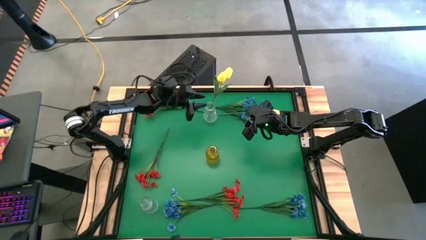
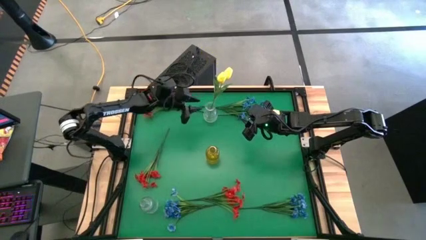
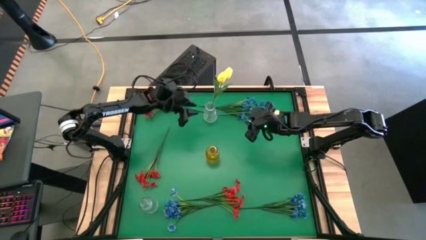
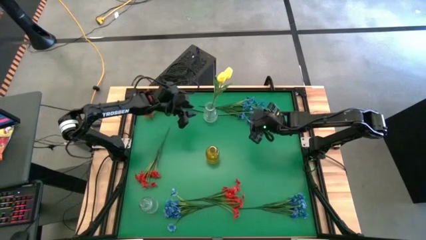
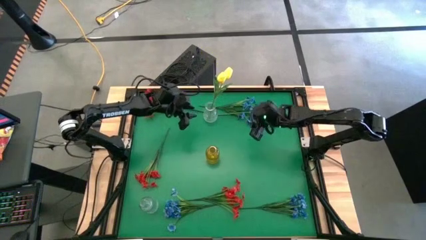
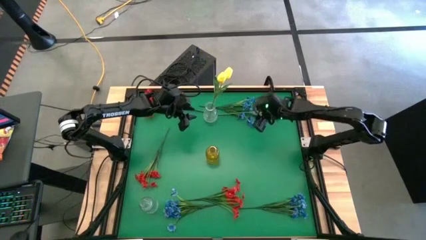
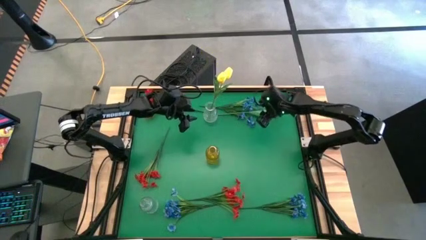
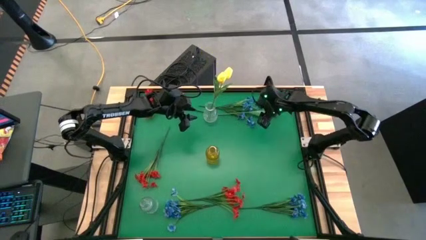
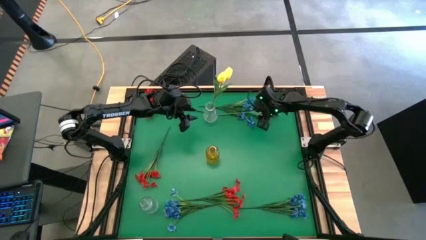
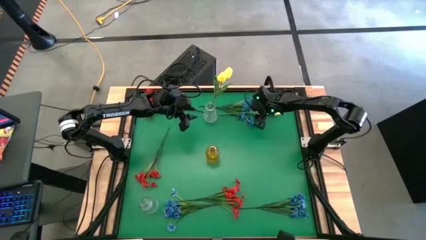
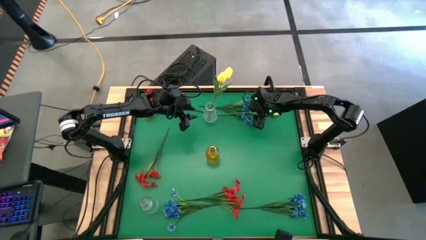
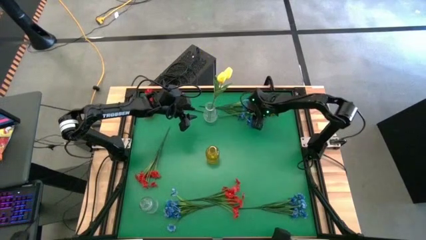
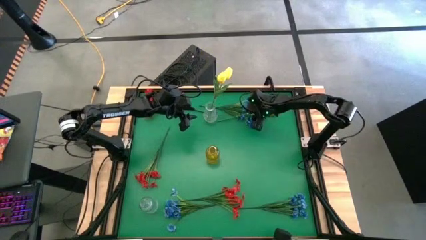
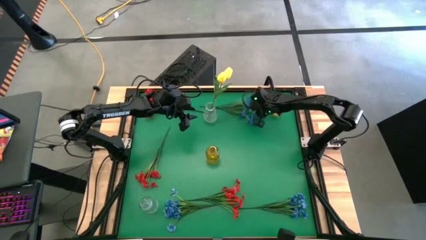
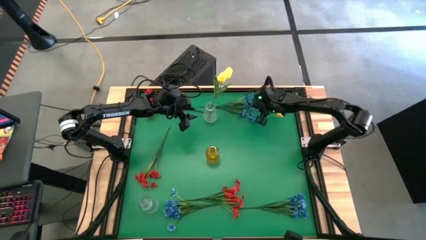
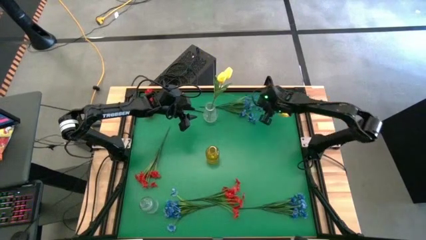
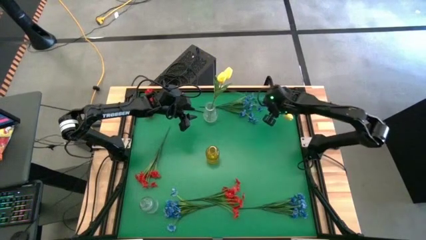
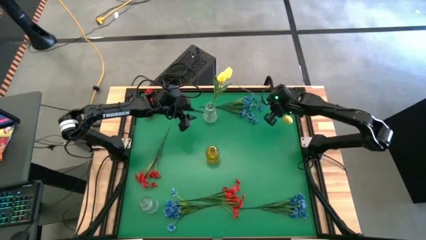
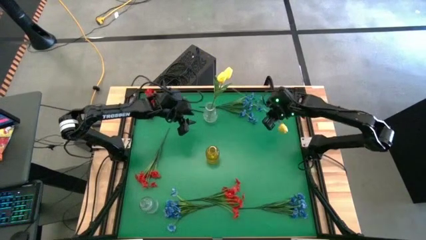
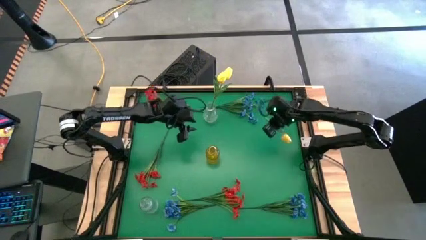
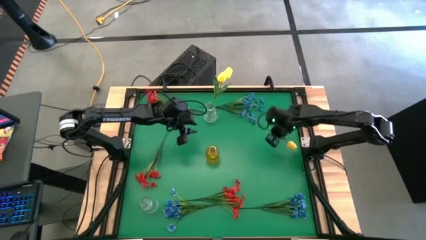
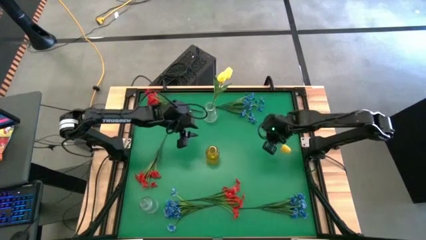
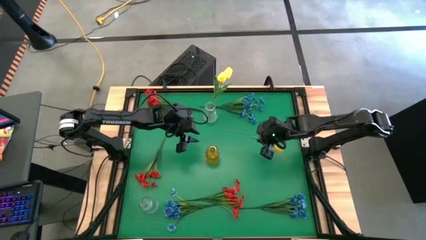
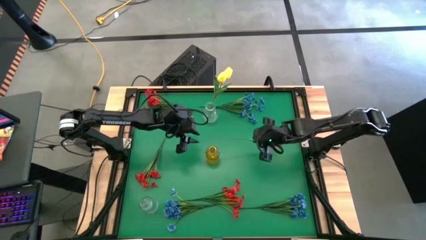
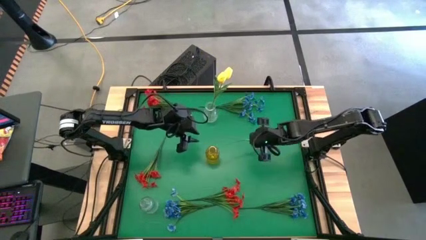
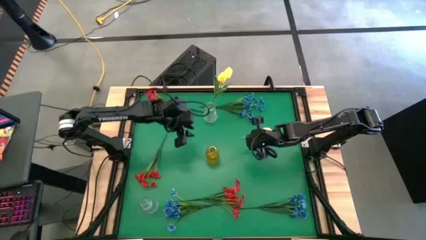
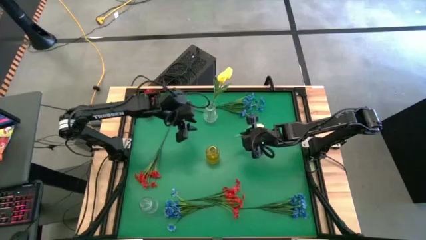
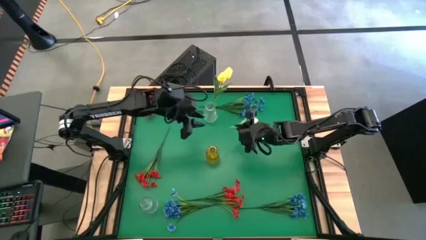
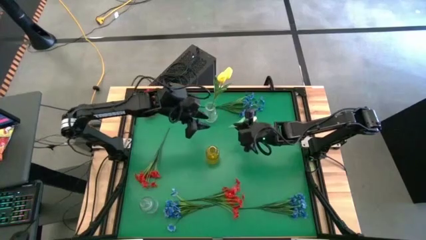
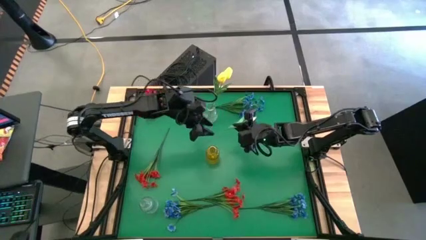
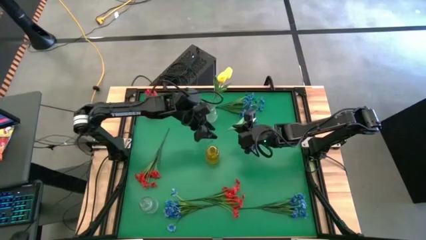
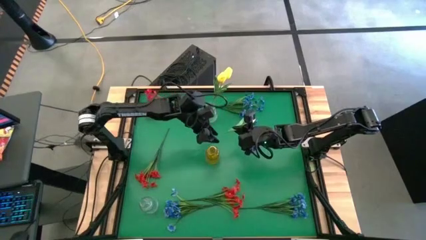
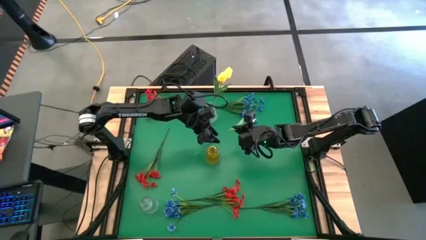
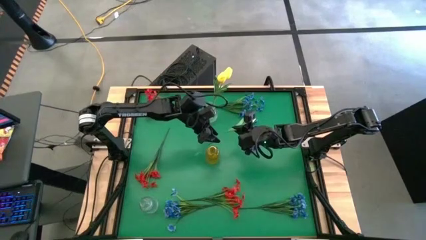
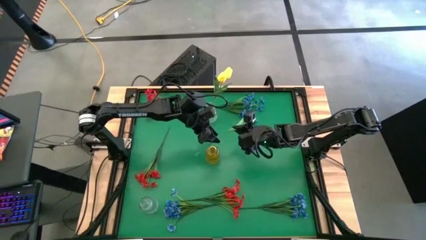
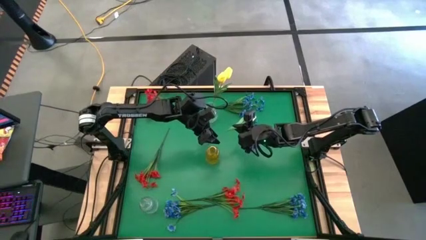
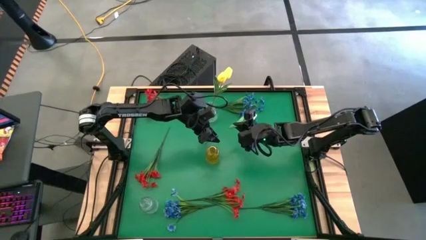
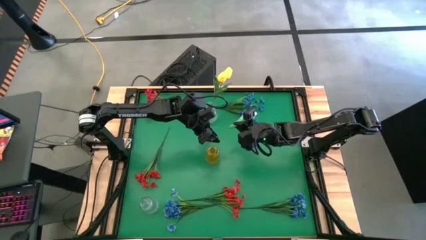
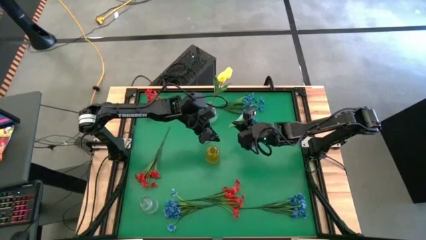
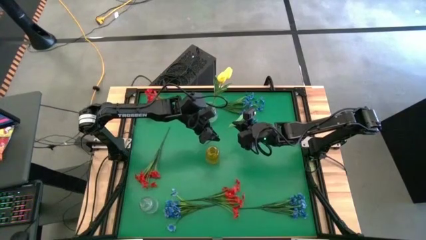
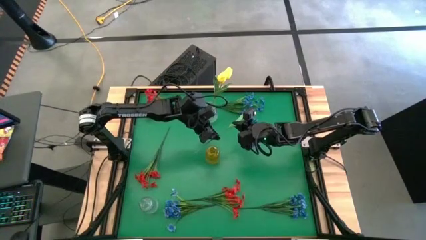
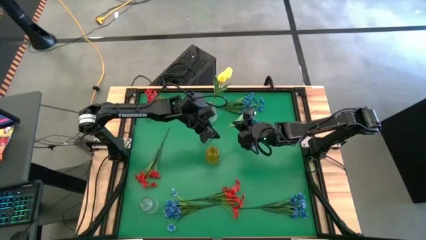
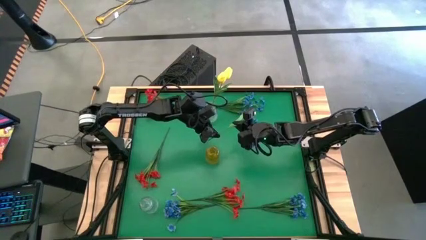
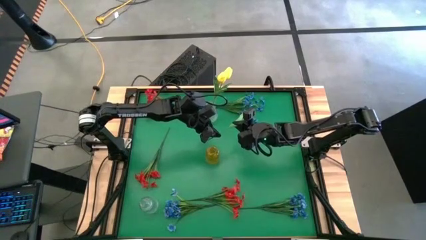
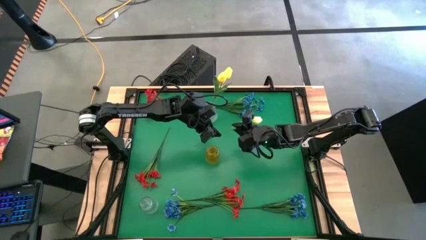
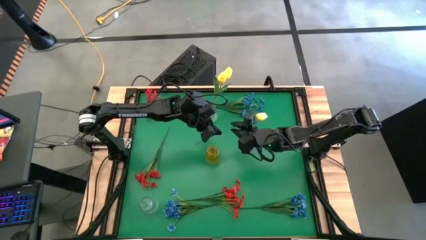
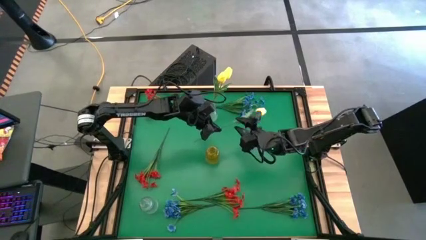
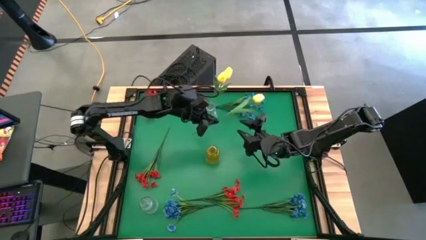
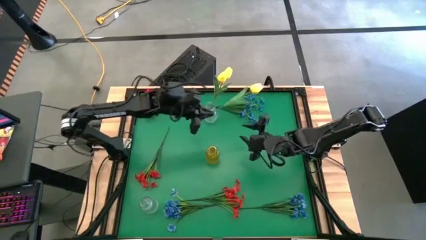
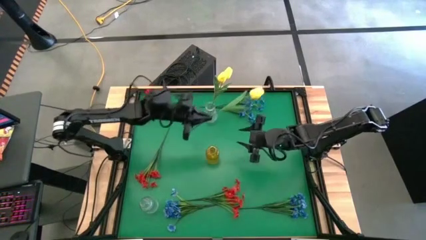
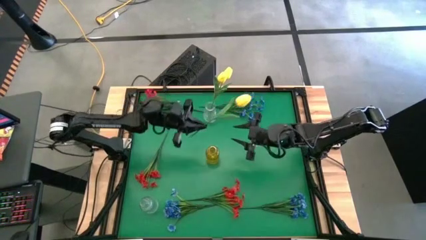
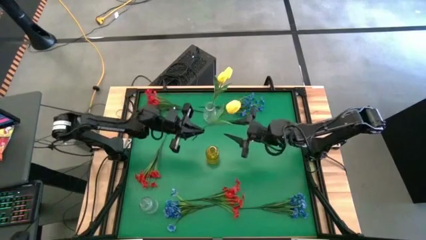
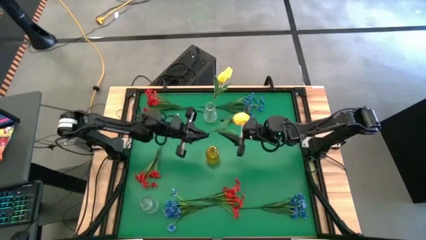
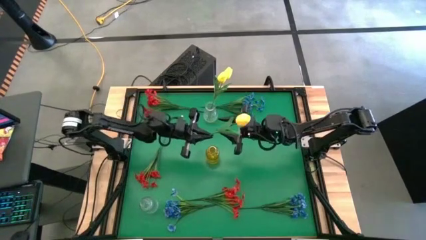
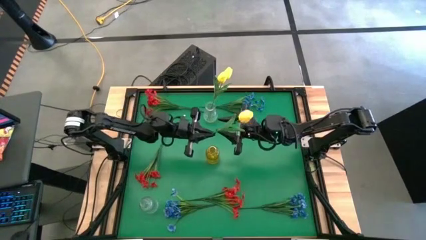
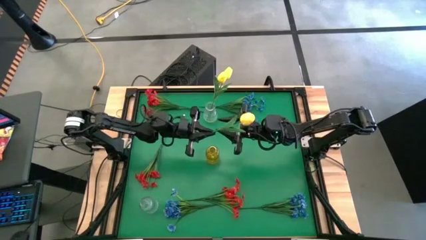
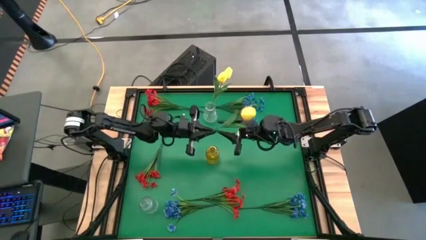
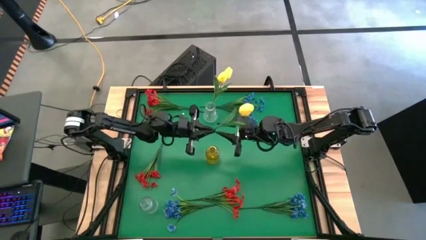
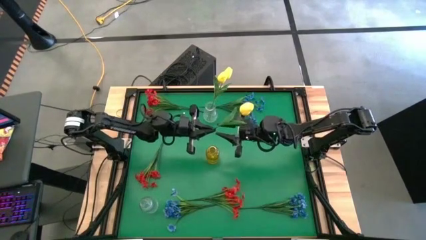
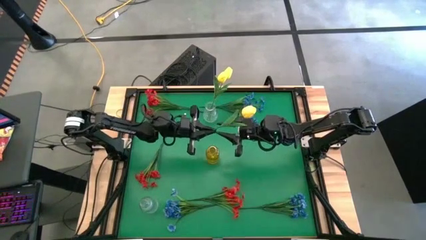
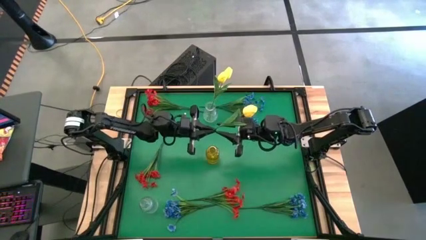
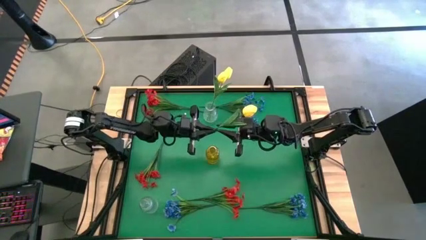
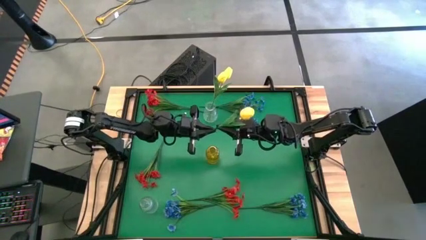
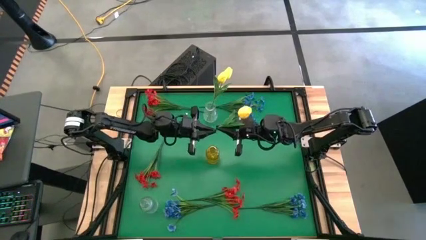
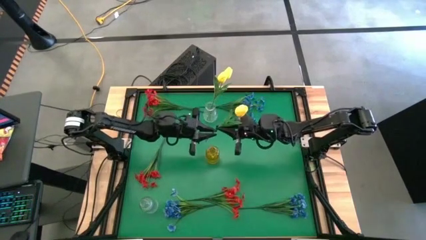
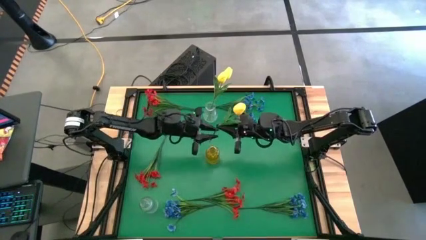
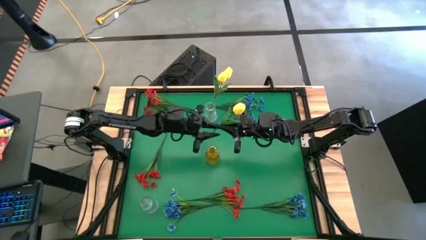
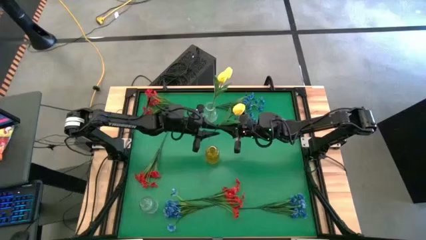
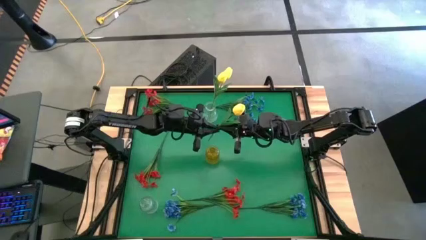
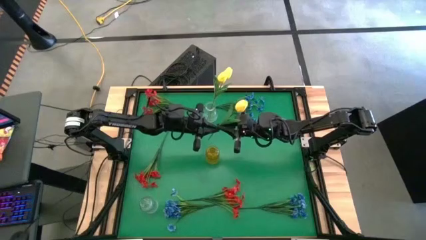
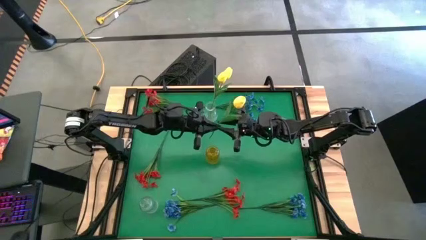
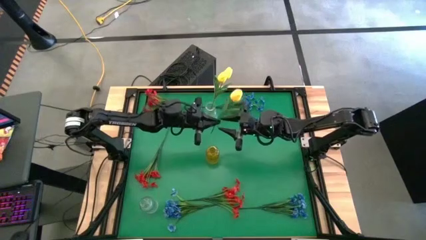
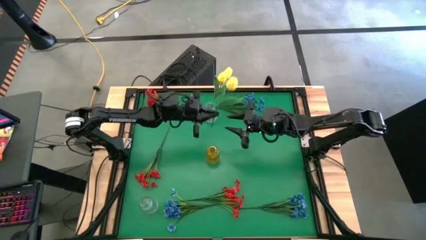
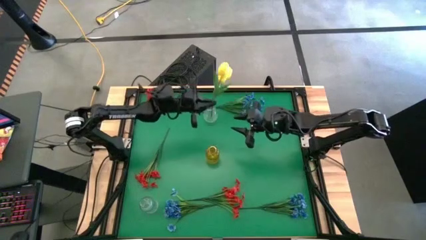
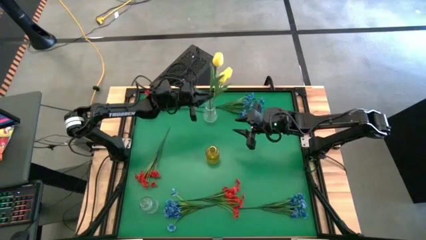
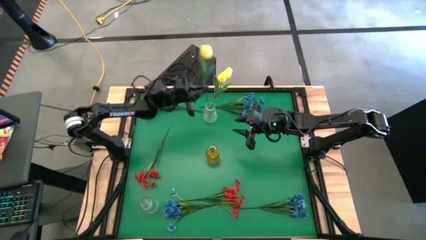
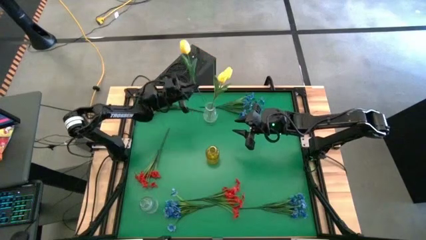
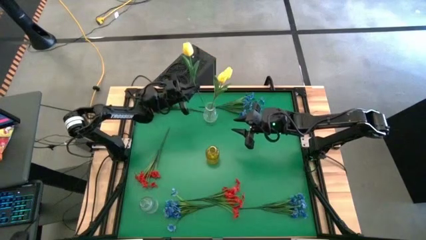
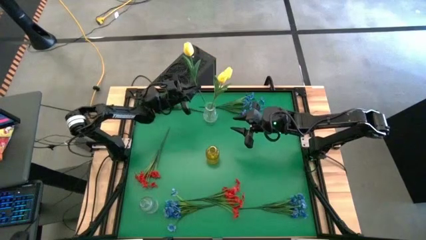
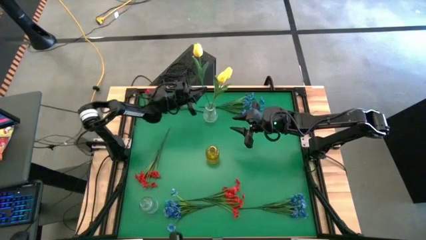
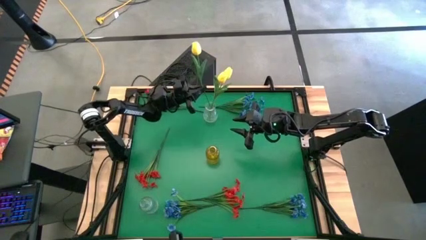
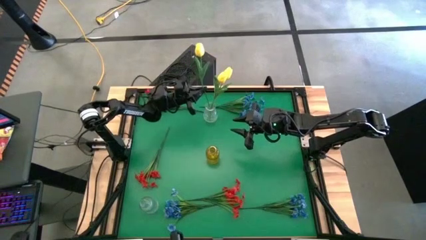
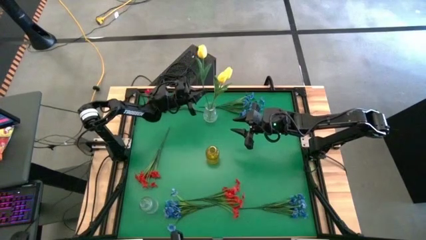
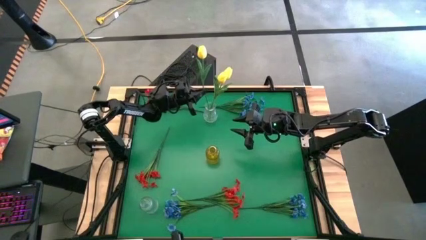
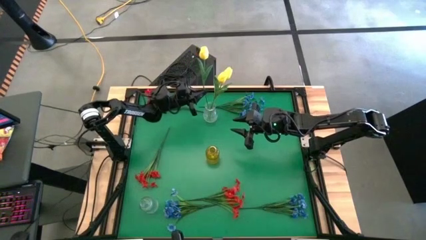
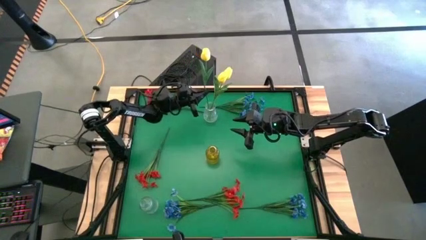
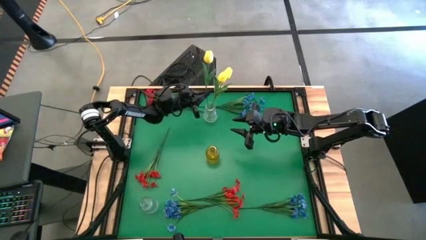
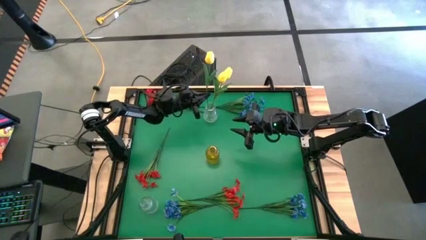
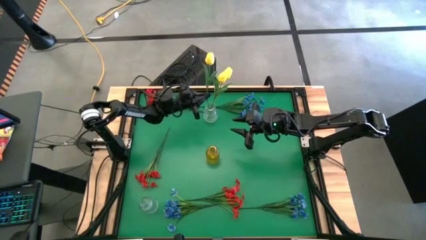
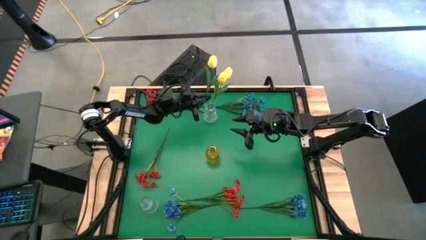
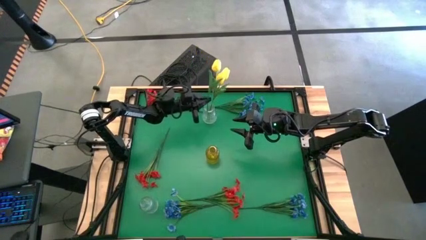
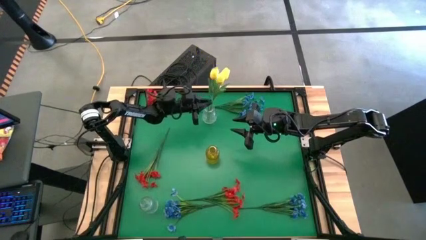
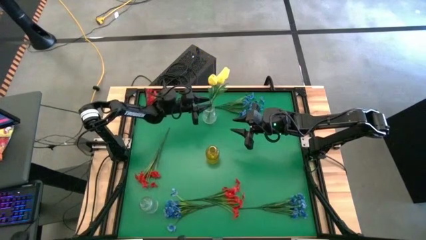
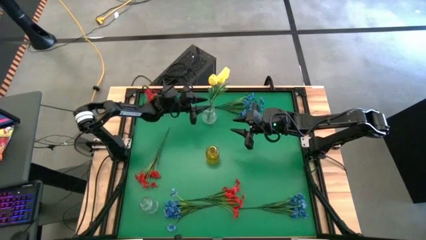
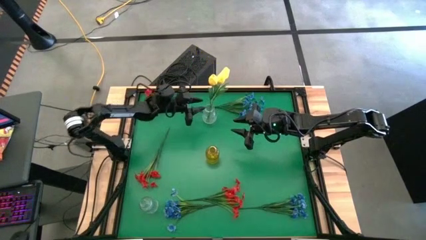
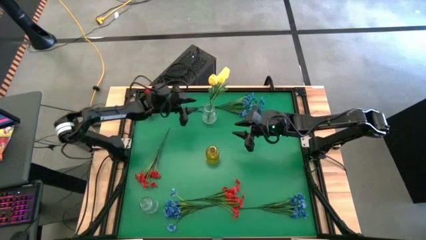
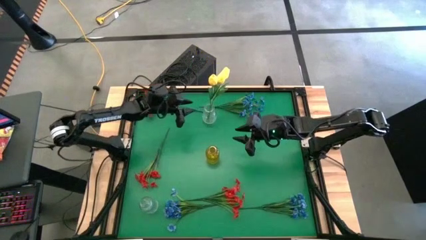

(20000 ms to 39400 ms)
Task: Sort flowers into vase by color
Put the yellow flower into the top transparent vase
